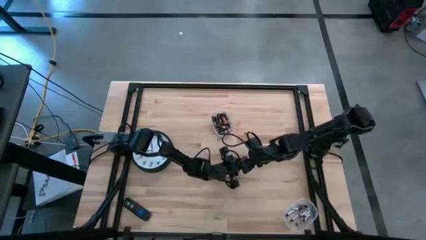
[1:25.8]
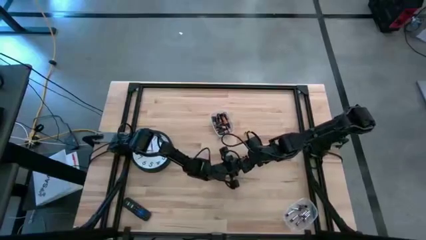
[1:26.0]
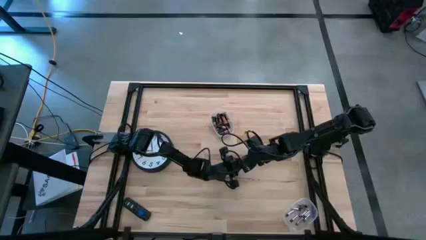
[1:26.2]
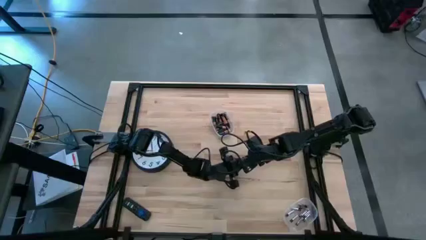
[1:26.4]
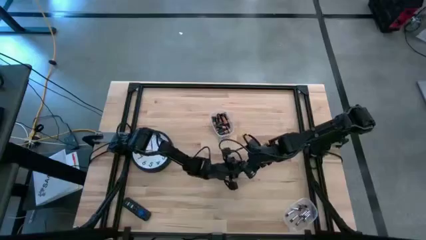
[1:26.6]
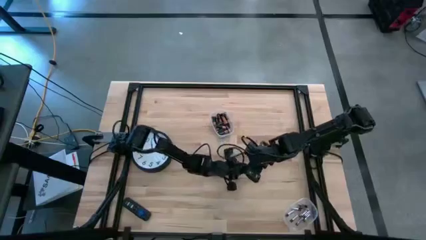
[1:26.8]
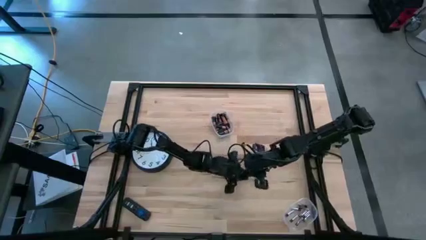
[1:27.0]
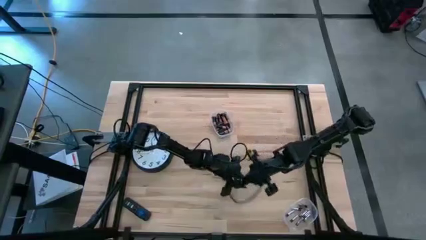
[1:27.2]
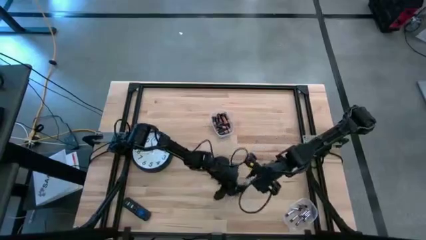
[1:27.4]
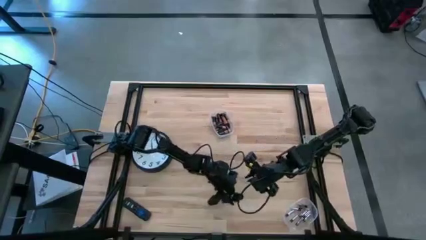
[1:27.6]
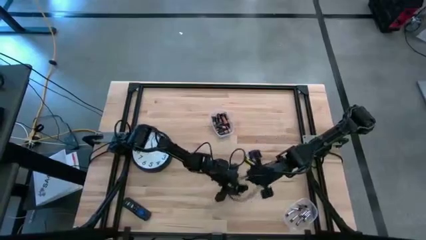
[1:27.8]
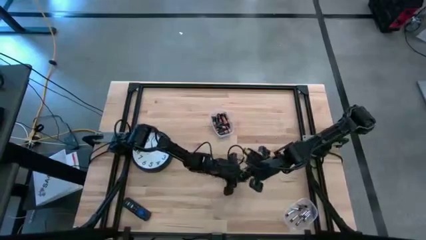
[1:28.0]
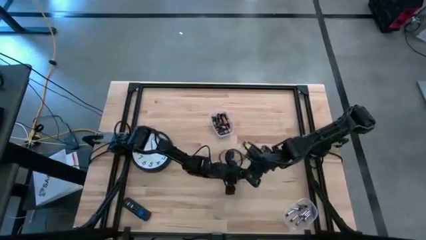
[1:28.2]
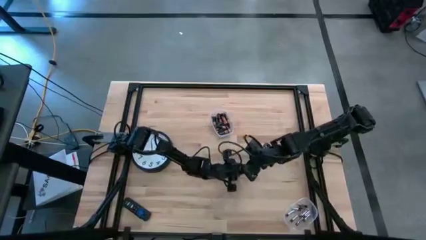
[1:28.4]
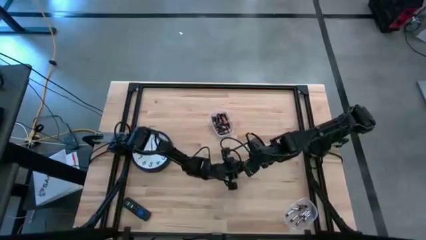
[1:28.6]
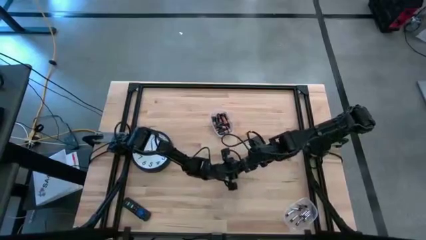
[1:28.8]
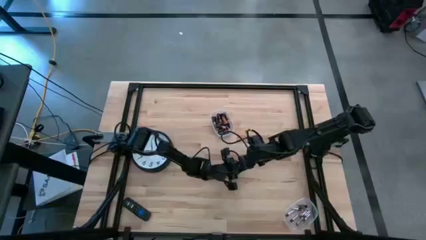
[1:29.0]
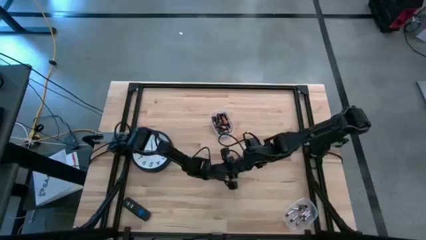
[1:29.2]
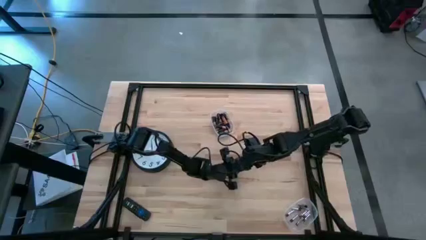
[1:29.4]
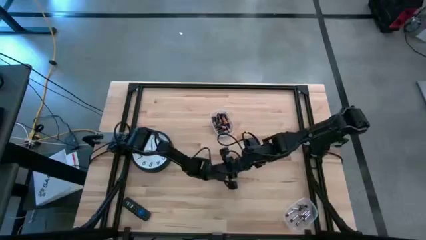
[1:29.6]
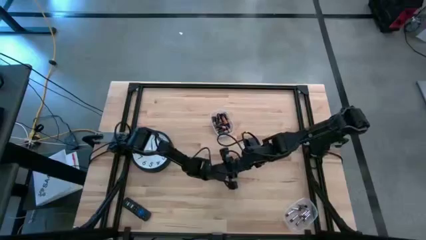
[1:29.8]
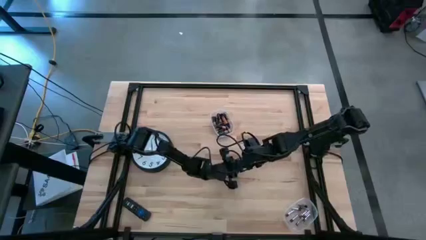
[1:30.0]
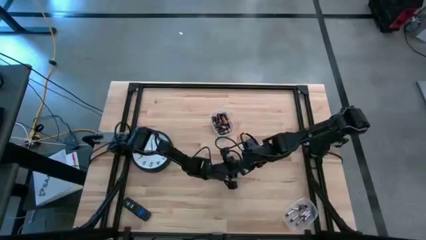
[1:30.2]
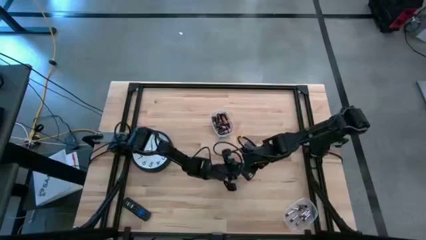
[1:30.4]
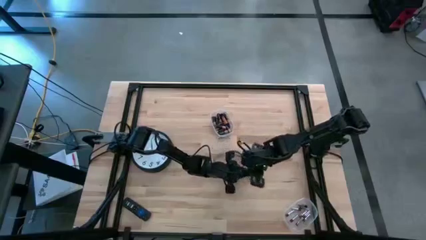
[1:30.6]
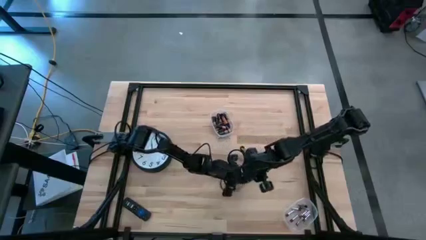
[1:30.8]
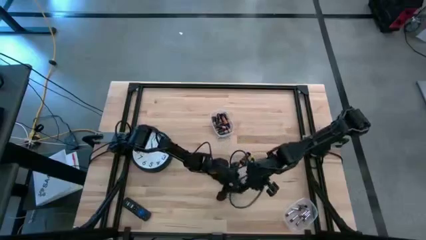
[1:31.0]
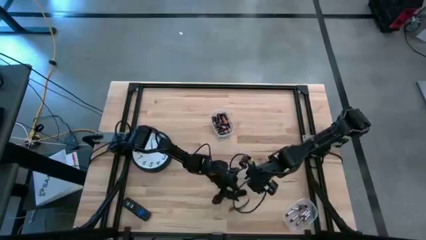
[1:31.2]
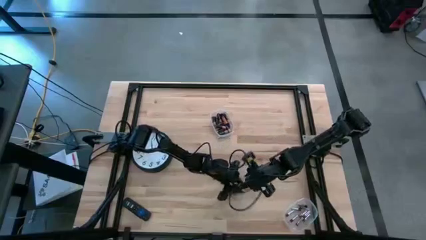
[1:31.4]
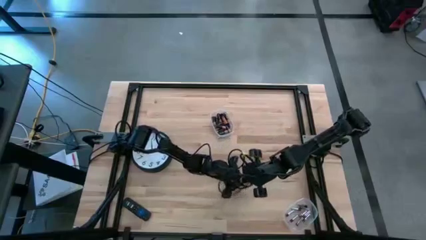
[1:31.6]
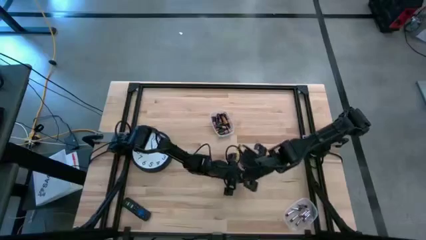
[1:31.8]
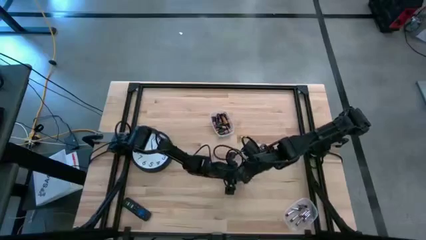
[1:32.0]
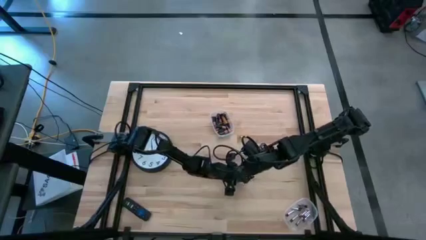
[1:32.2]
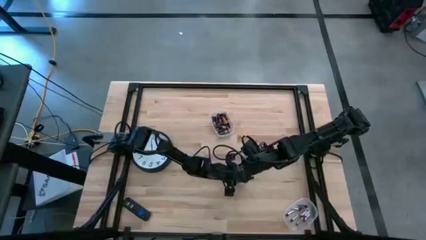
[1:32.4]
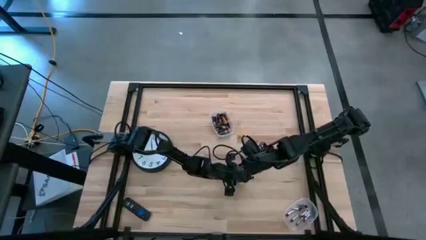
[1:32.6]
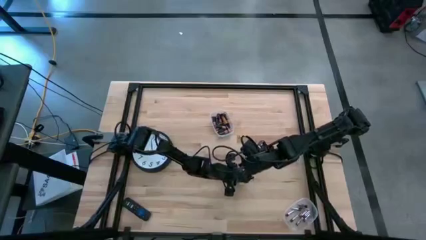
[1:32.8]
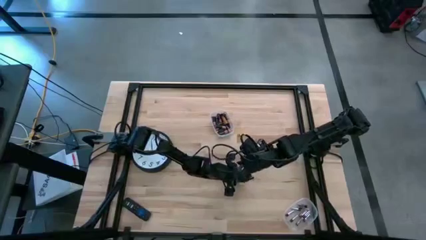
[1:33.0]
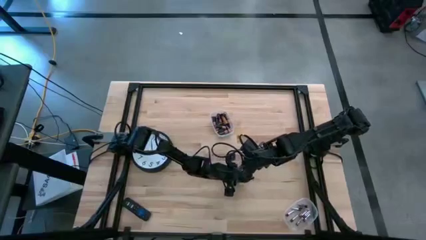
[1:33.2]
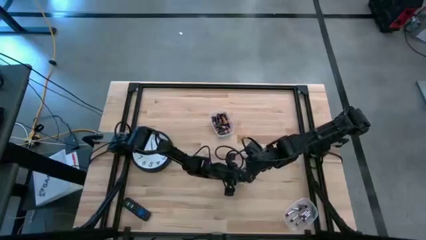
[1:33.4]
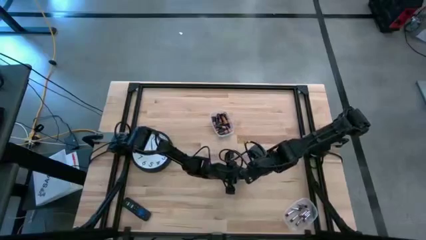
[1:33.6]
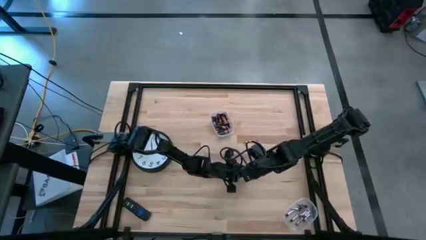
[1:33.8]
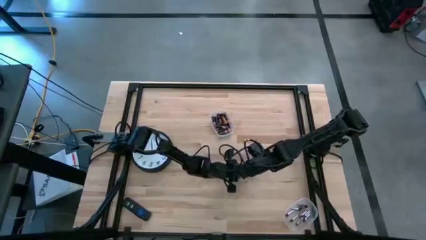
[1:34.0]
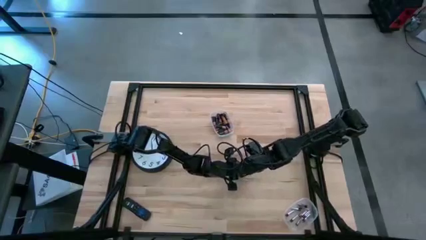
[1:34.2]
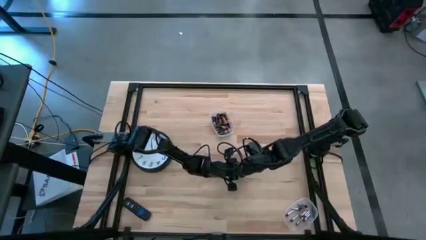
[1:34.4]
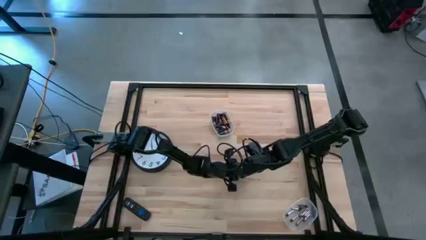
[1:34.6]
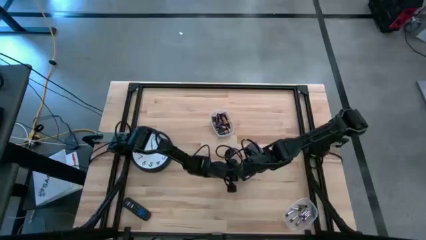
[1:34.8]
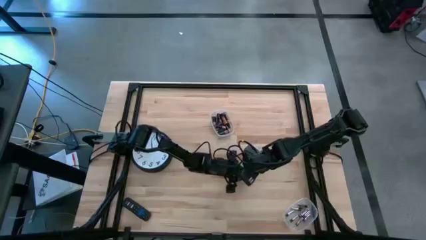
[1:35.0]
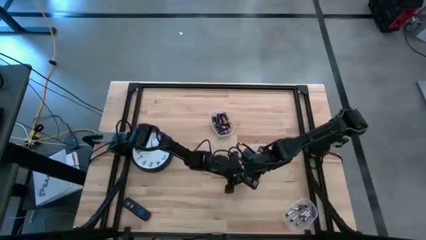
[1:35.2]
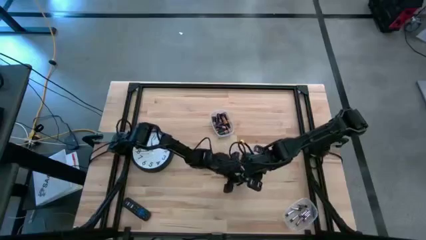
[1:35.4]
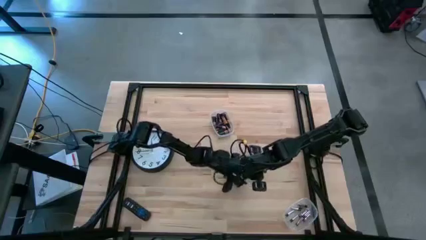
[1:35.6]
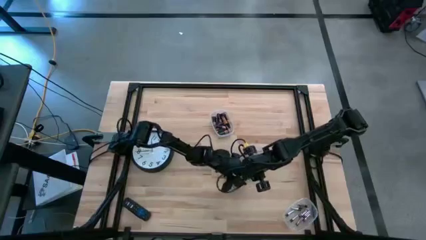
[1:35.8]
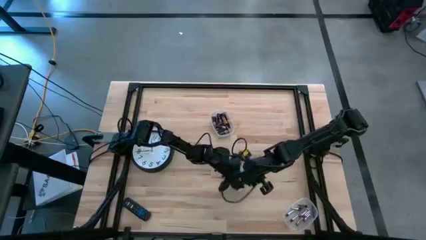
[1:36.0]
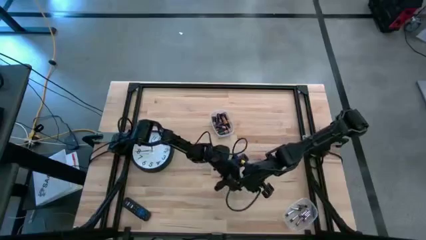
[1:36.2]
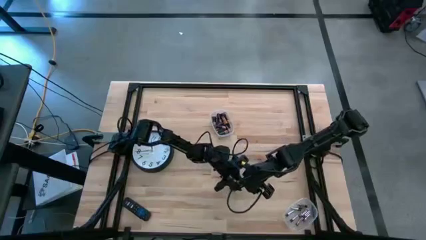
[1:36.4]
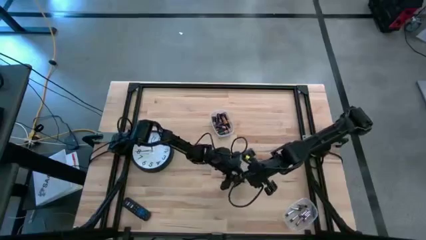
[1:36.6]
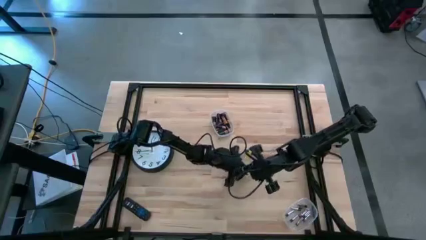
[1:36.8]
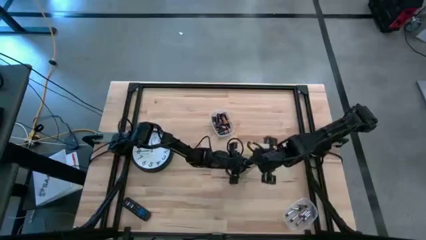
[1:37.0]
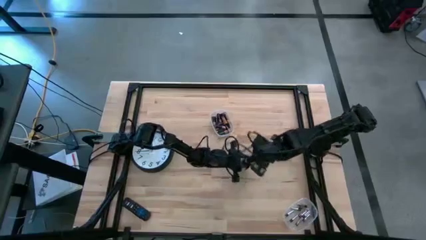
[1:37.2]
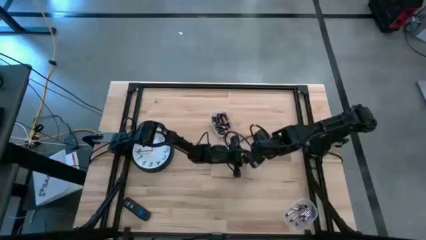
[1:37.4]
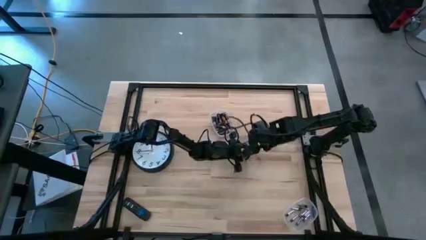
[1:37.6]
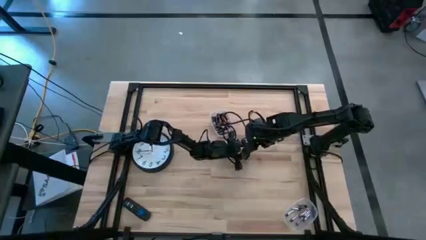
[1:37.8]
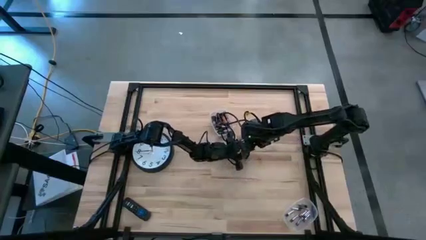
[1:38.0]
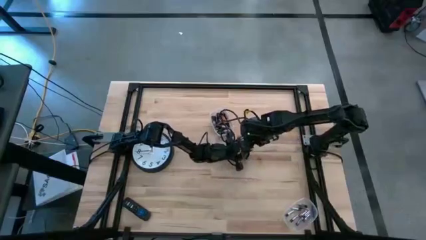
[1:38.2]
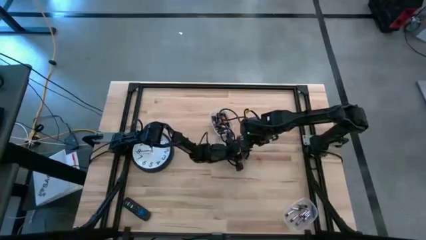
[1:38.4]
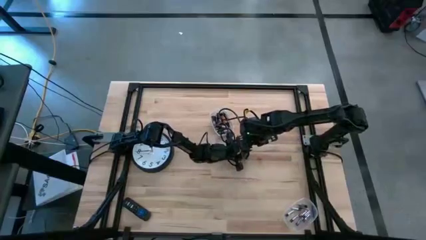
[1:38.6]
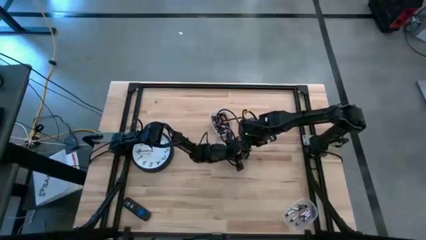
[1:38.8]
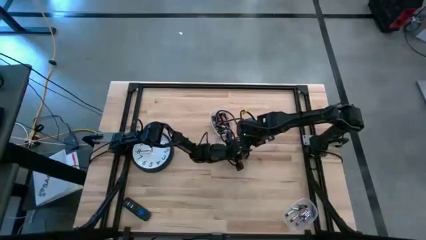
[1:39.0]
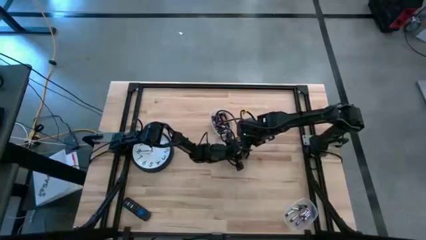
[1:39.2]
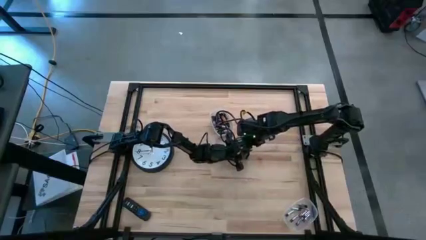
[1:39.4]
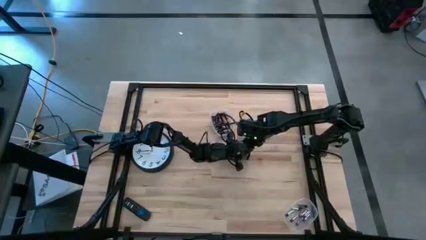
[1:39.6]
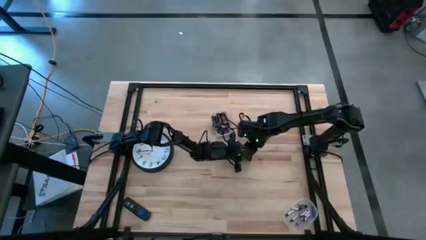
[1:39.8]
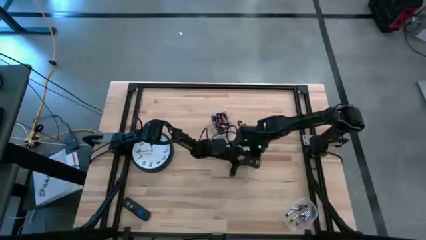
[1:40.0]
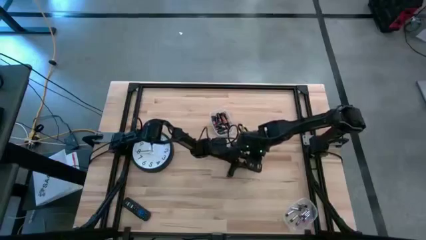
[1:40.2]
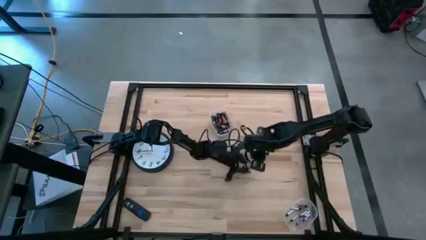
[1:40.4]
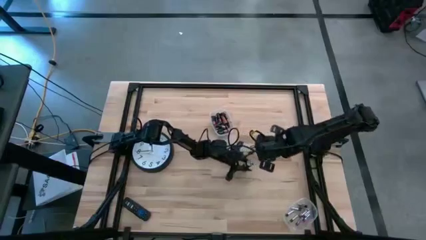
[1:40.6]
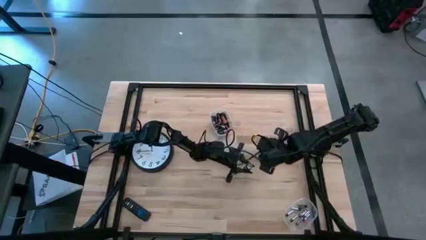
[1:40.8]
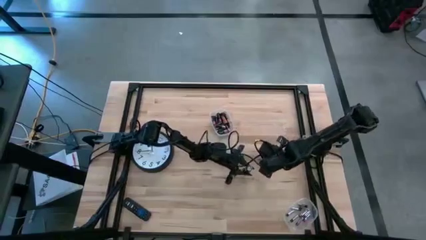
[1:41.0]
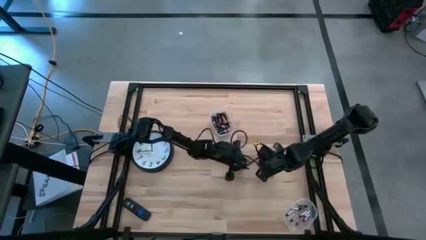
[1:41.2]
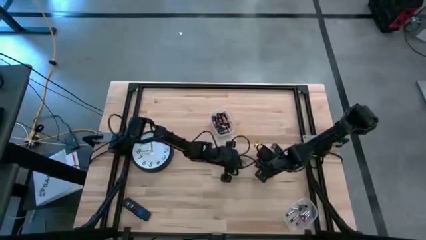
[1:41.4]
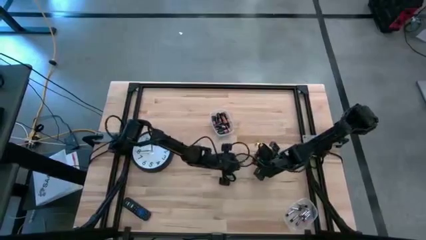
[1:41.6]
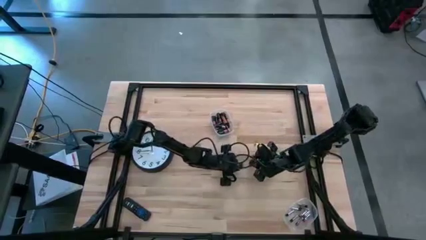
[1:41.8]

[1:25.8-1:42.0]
Task: Insert battery
Open the lid of the black flashlight
